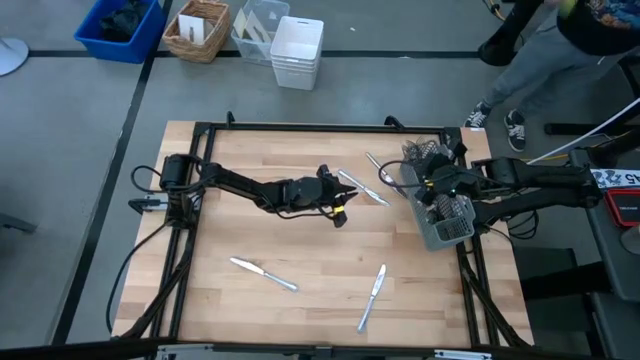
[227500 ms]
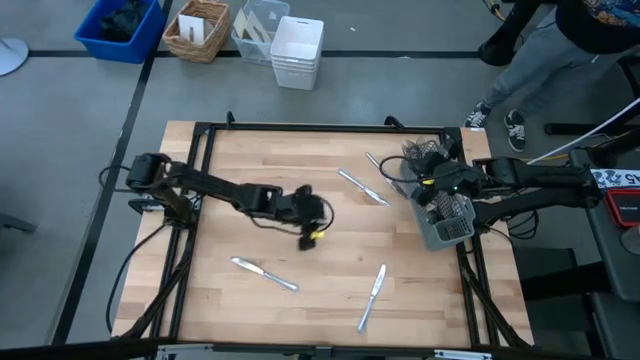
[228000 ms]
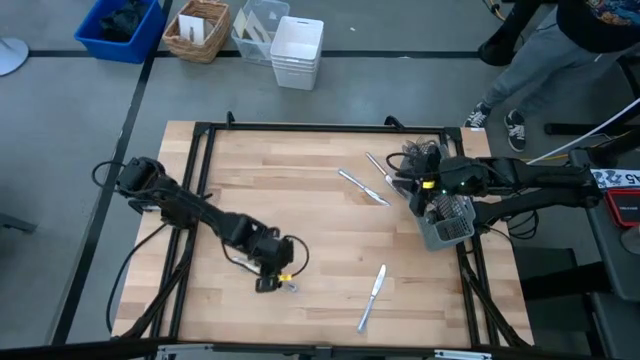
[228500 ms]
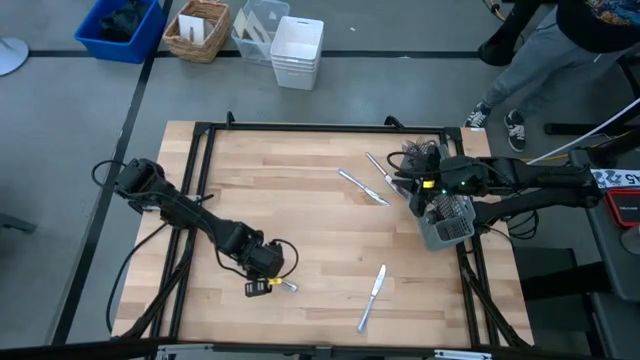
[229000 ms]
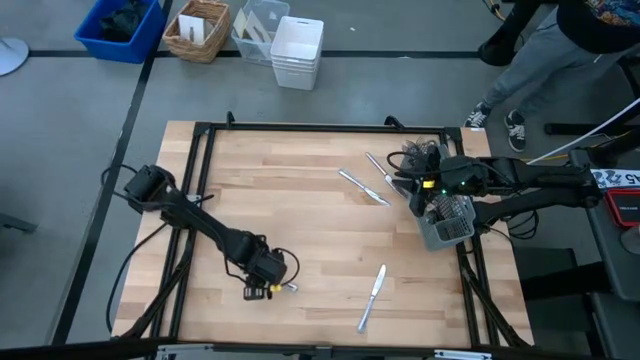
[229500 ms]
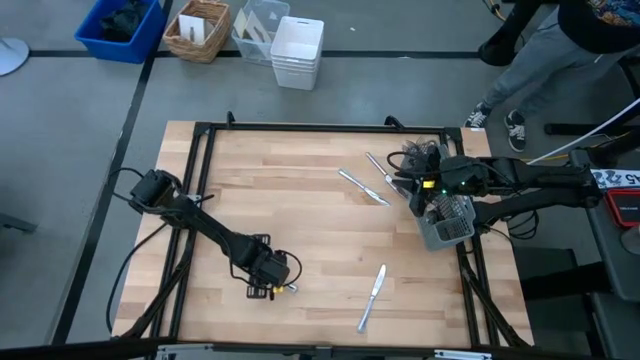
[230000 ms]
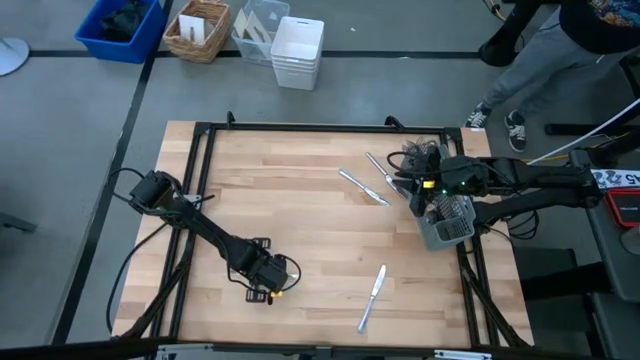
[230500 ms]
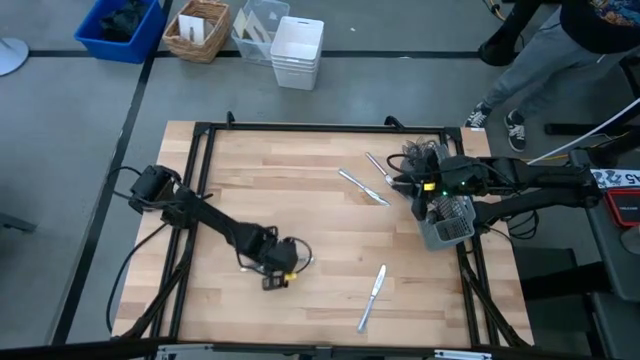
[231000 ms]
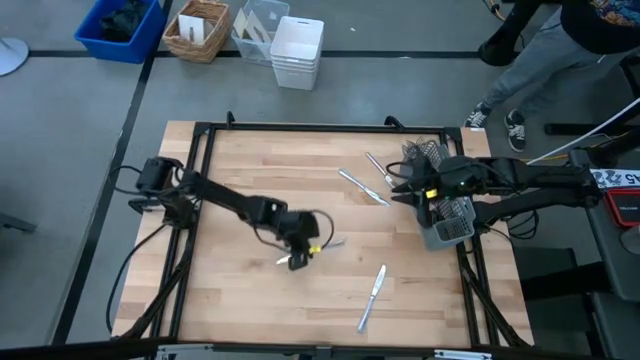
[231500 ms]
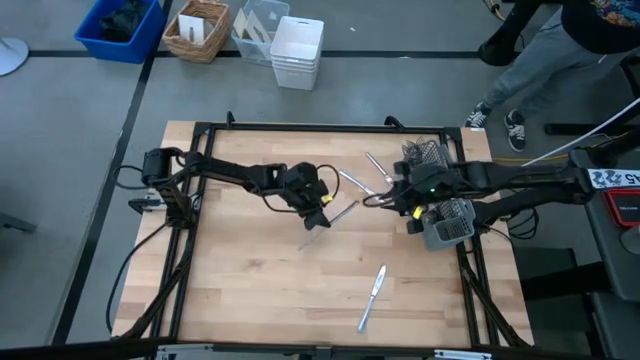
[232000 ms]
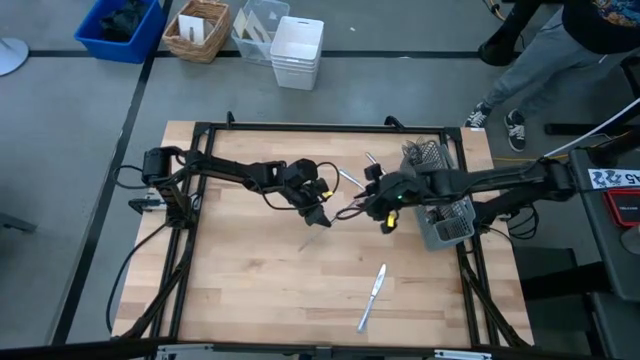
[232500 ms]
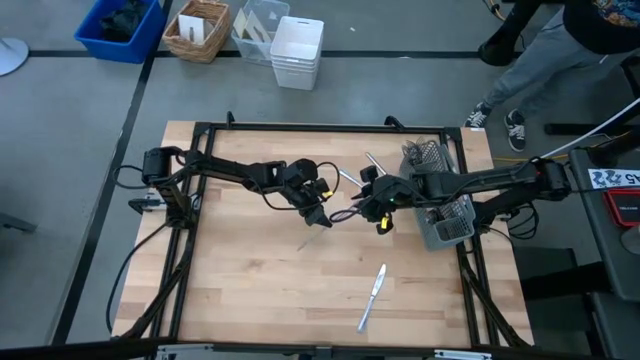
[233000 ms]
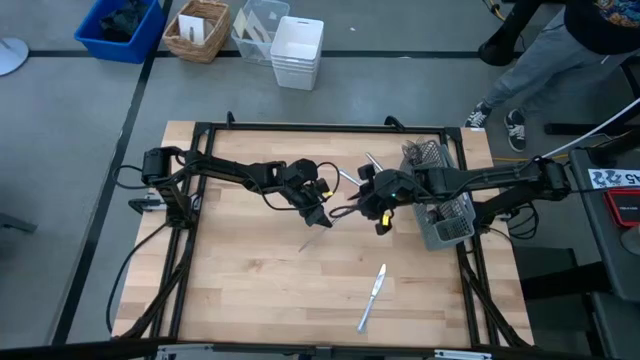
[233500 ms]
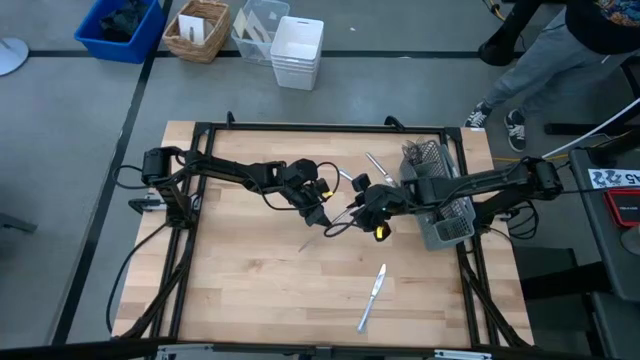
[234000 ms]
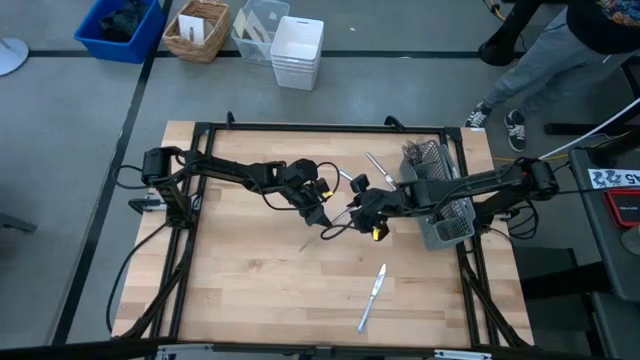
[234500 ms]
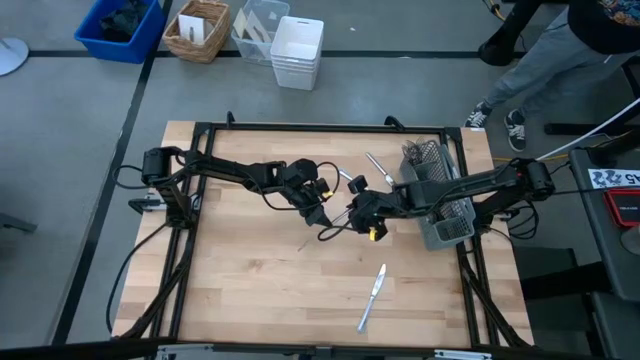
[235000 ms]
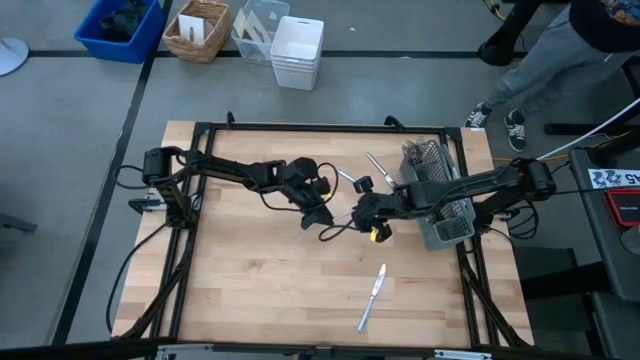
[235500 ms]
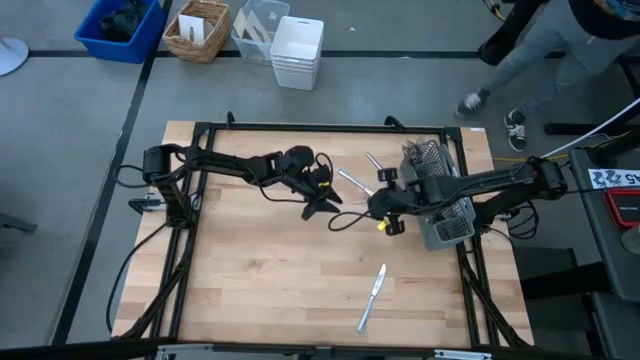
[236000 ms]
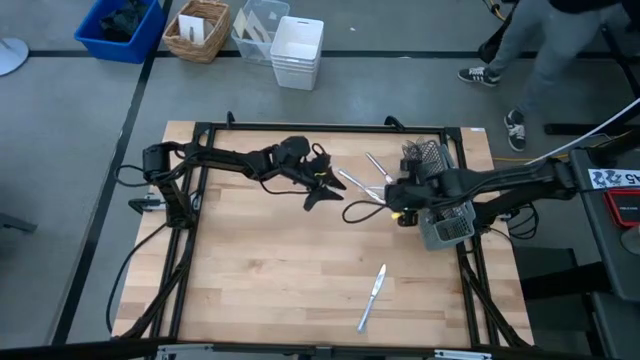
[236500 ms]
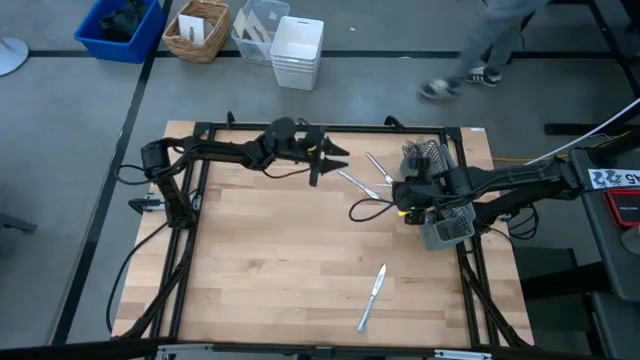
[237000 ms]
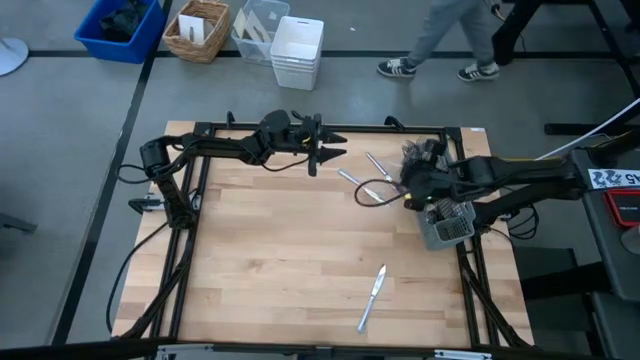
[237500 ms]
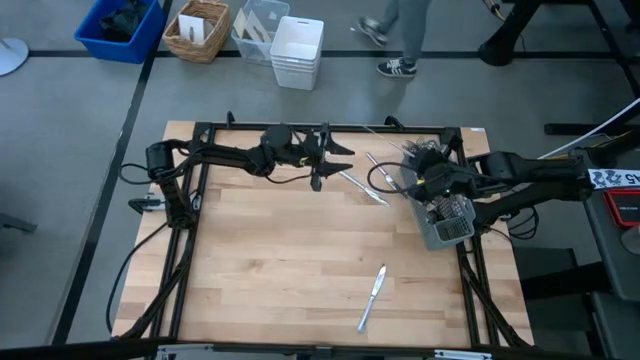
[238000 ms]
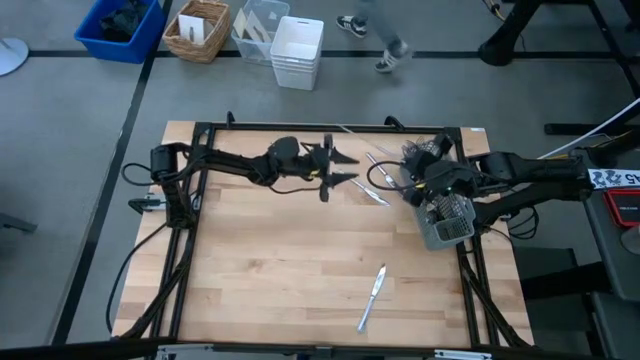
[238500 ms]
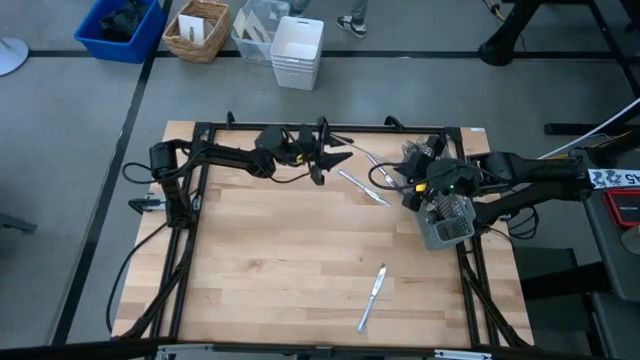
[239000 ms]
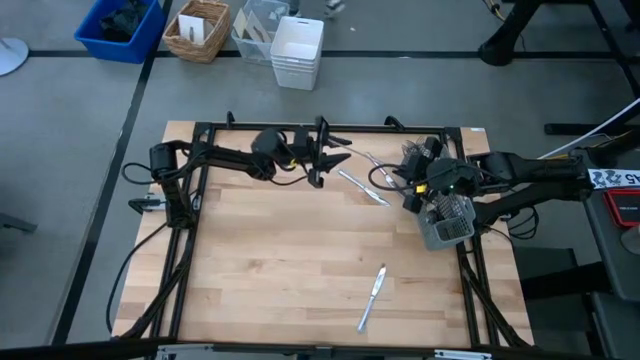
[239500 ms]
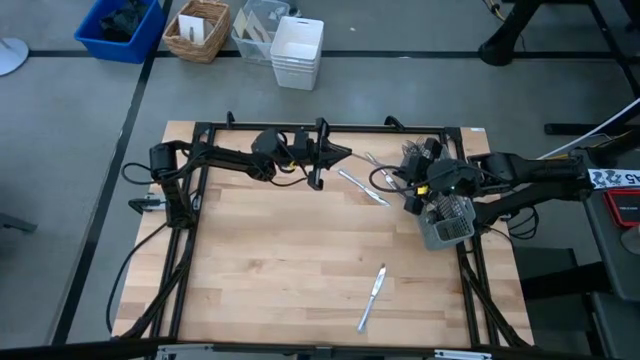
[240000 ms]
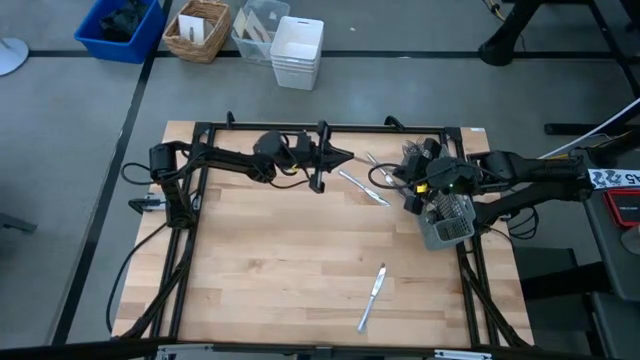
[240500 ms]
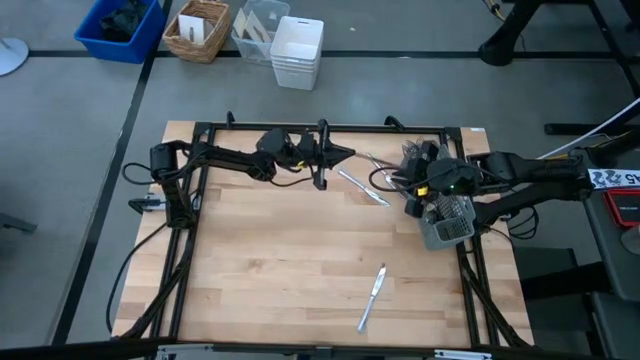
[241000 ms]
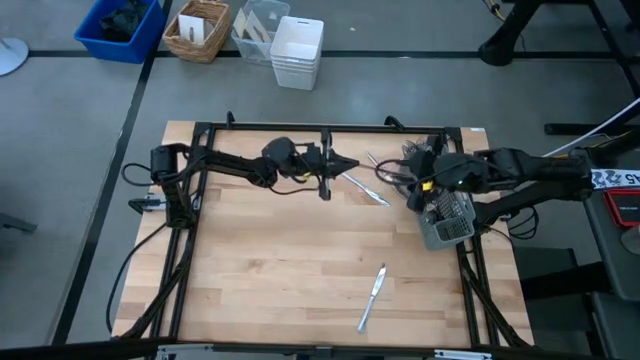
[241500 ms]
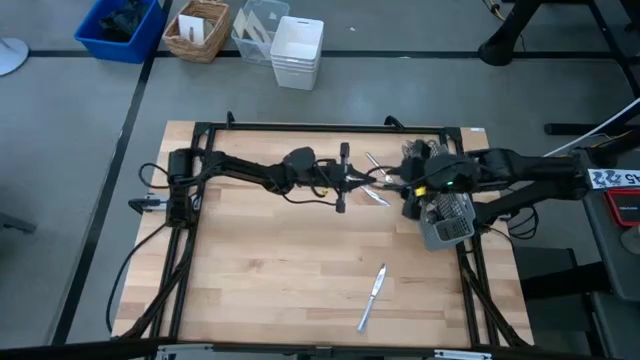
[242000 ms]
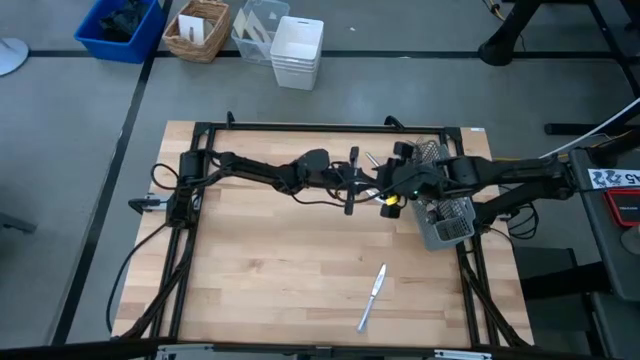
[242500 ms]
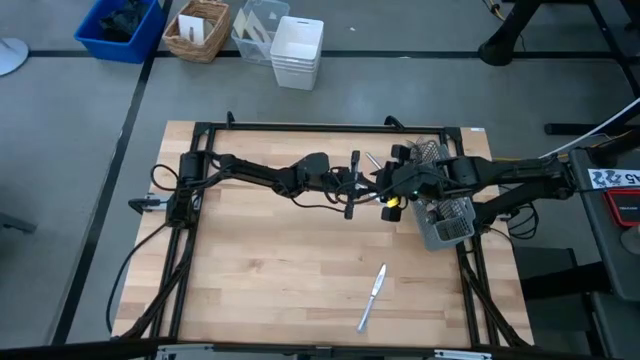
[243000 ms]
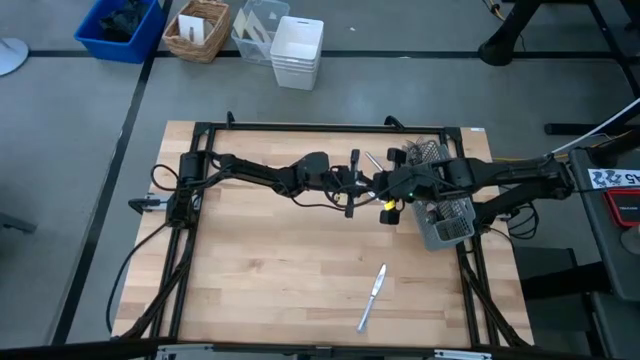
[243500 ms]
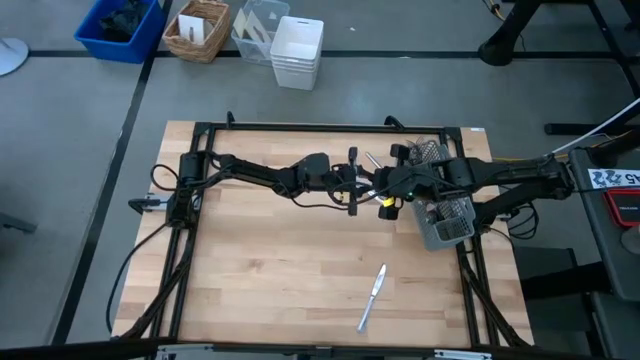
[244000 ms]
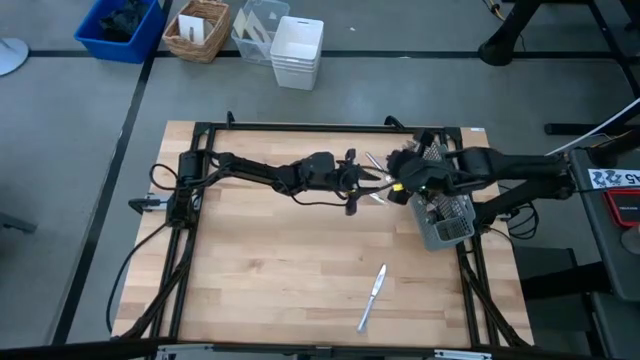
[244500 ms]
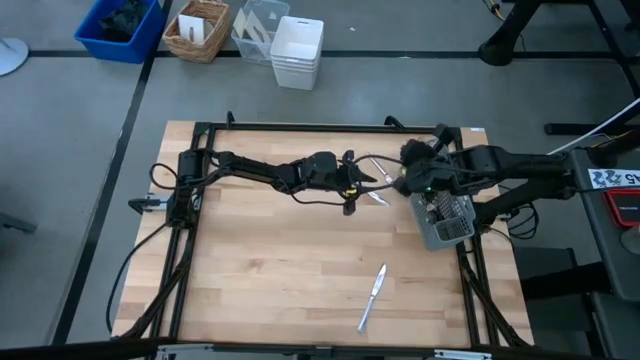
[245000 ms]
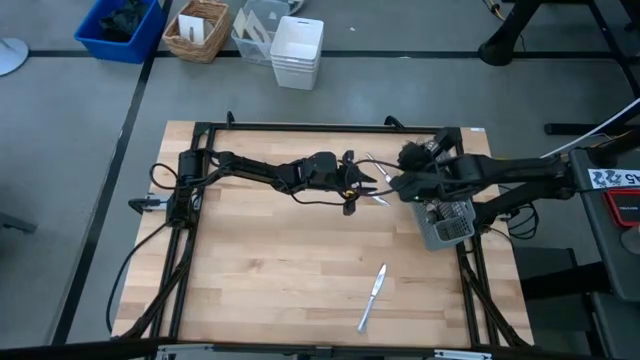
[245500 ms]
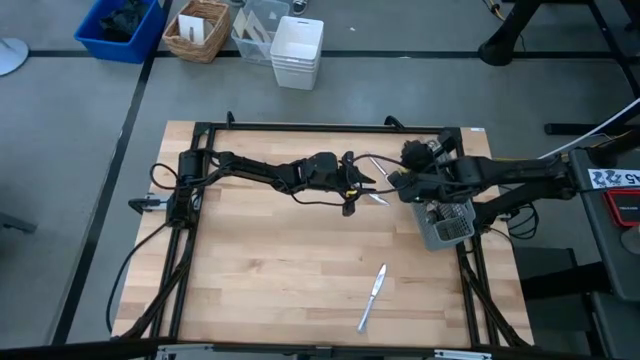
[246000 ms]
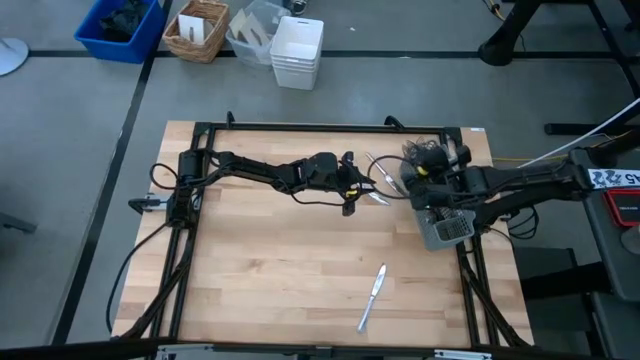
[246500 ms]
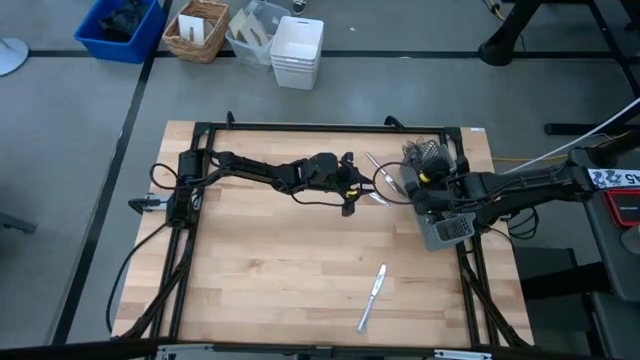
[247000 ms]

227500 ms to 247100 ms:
Task: Sort silverware
Put the knife into the middle section of the utensil holder

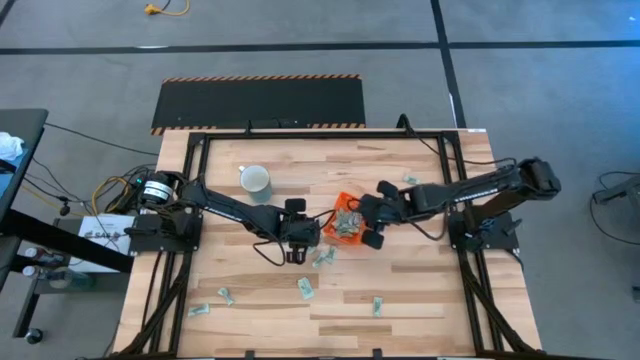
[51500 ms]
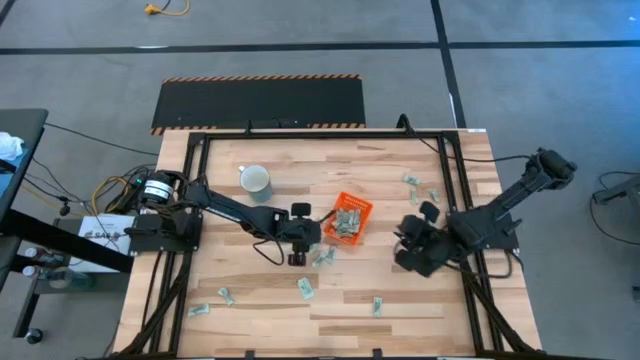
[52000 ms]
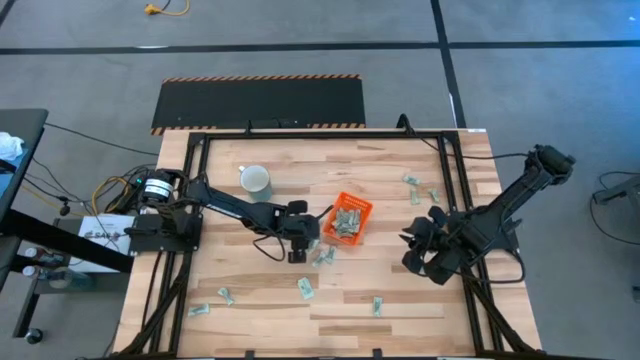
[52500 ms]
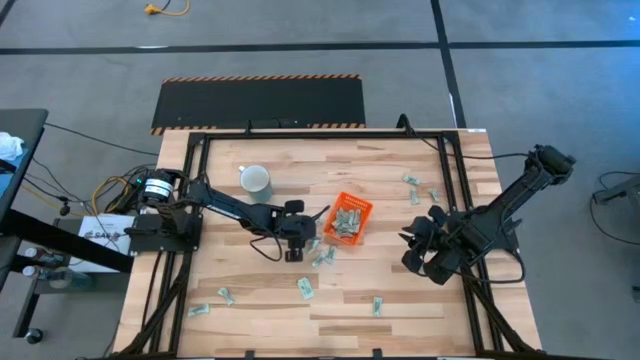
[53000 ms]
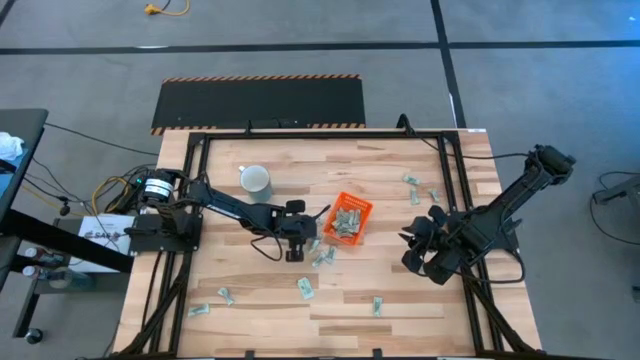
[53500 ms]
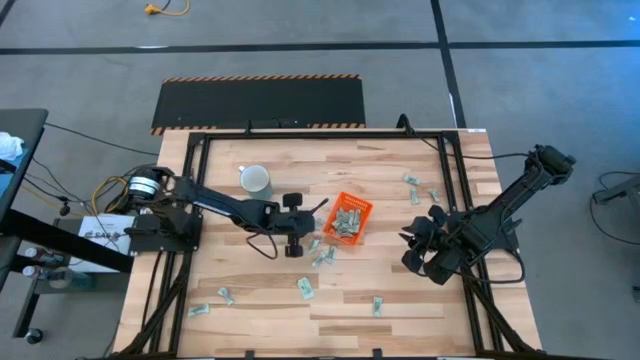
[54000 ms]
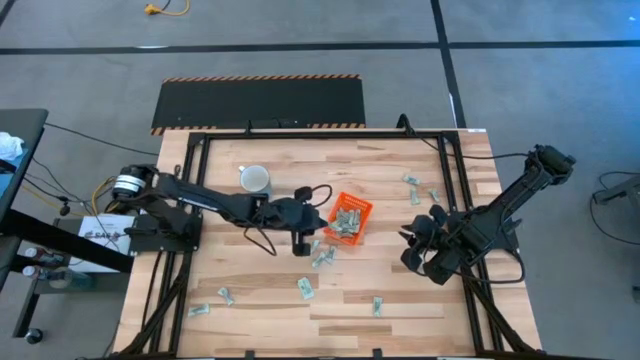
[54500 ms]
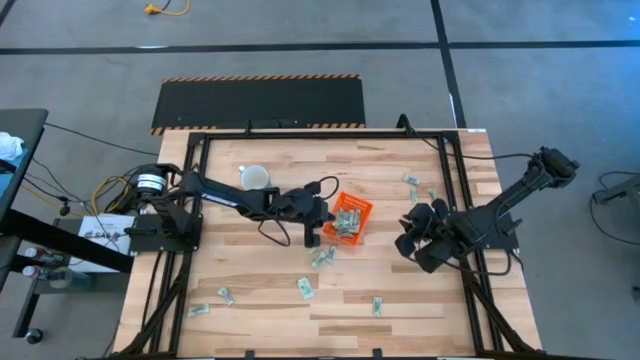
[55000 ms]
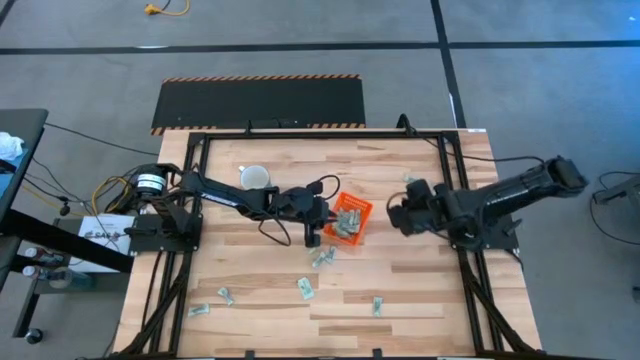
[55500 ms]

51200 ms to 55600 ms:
Task: Pick and place Stevia / Truvia into bins
Put the stevia packet into the basket
